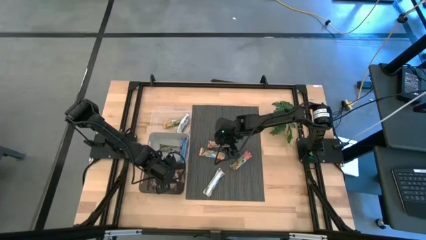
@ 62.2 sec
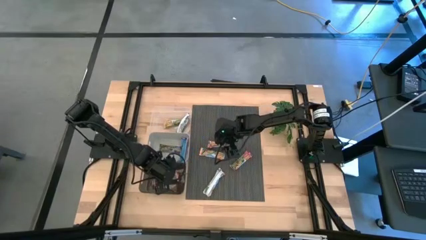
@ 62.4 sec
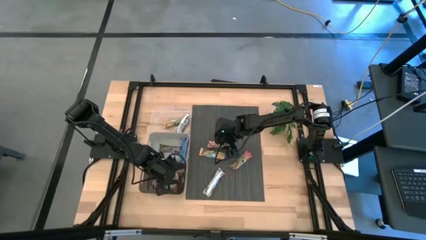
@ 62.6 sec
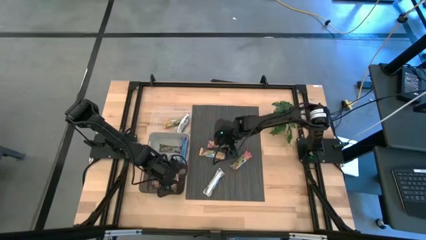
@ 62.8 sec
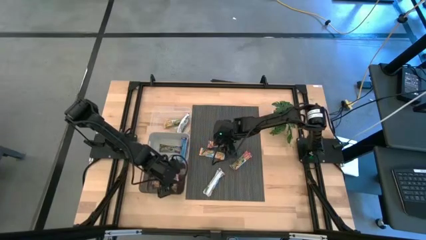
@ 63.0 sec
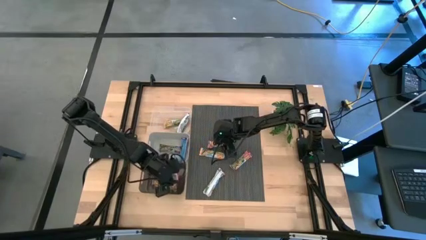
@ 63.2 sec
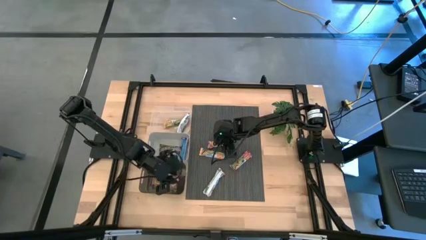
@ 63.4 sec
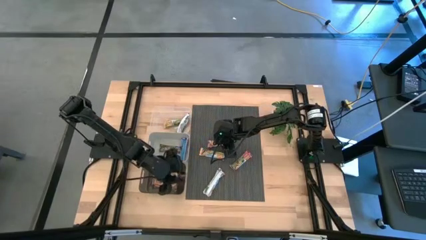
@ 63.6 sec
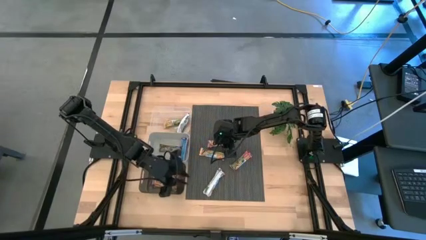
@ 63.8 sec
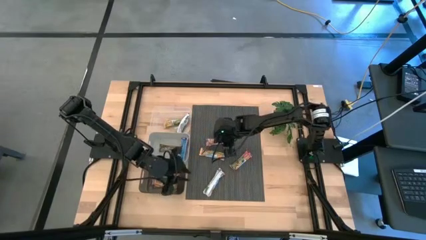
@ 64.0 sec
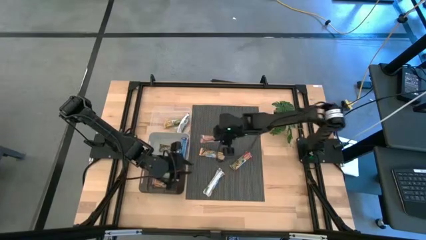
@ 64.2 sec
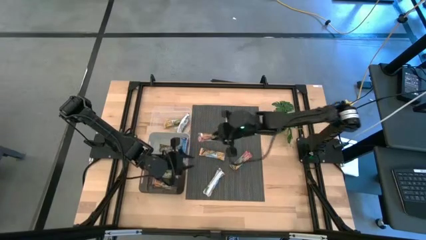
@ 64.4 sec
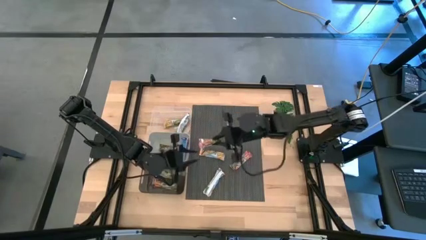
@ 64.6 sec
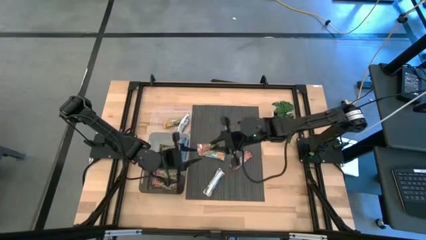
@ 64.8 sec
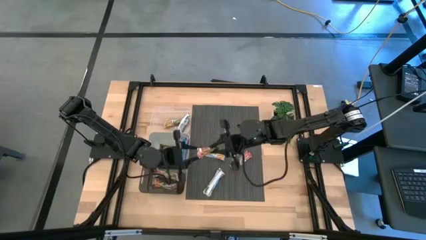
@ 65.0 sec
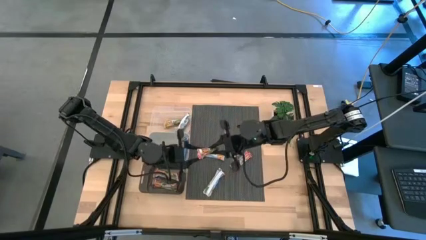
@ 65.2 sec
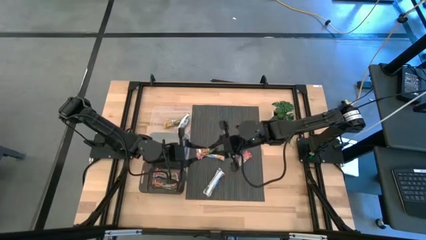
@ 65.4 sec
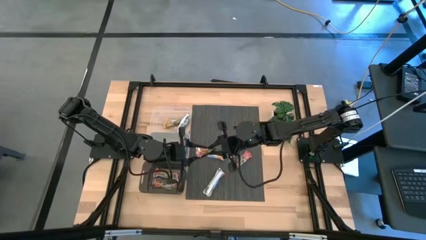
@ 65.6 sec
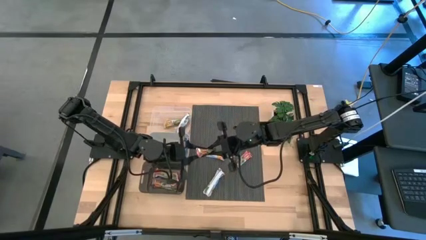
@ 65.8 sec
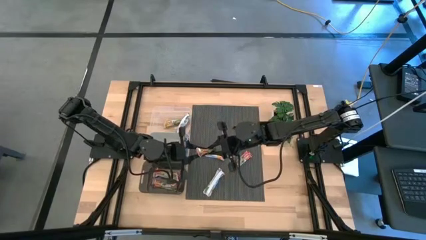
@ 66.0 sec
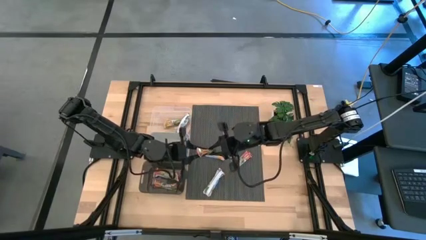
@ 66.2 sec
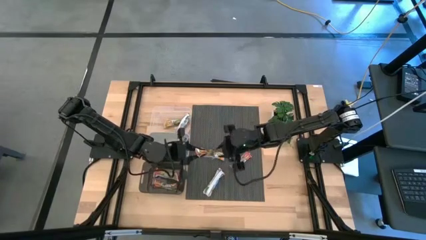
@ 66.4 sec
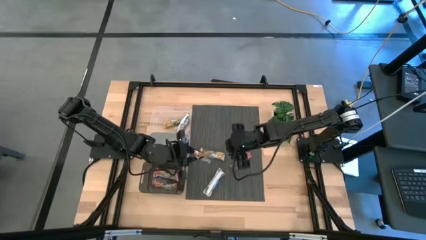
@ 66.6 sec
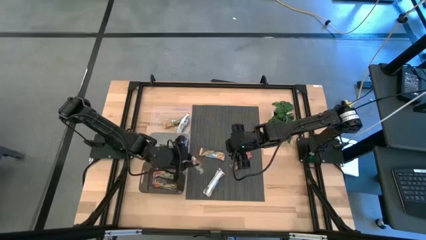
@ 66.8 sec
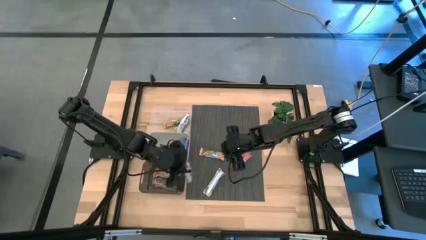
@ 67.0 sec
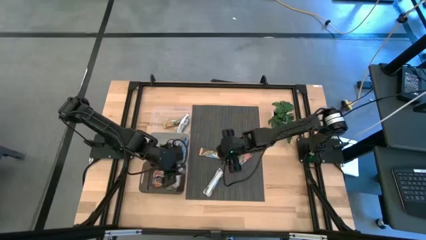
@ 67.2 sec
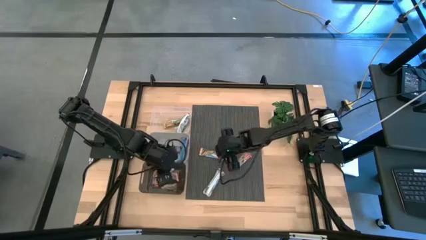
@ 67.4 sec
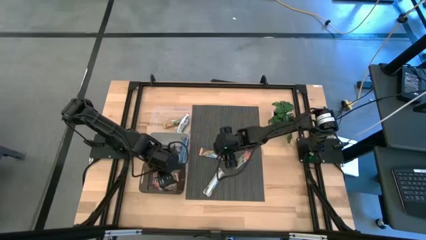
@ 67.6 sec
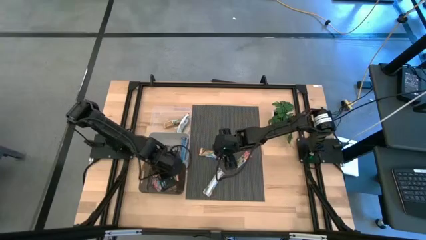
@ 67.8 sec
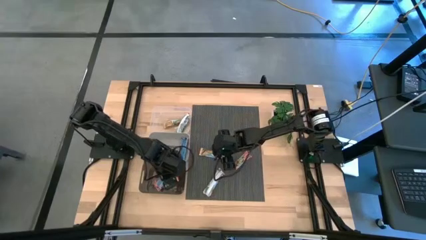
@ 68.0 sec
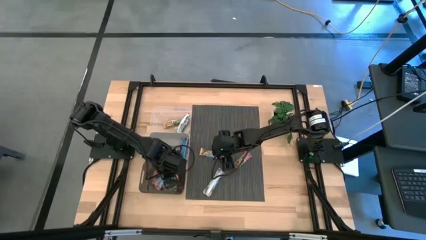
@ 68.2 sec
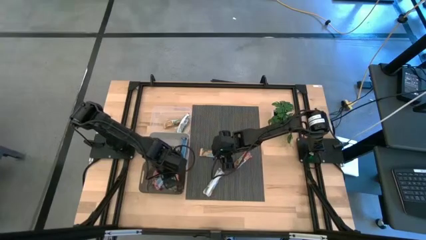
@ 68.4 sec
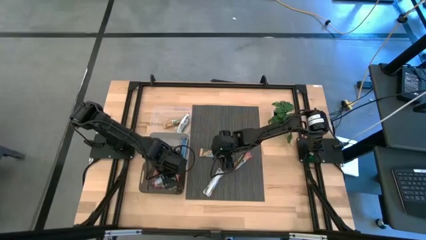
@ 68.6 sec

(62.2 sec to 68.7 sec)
Task: Pick and place Granola Bars by type
Put the red granola bar into the black bin

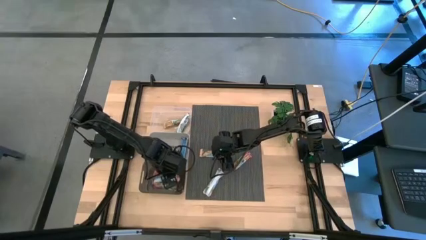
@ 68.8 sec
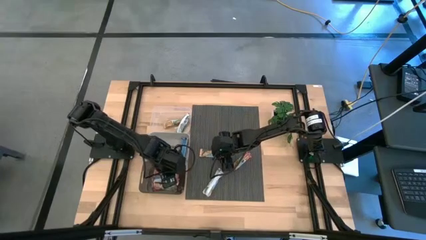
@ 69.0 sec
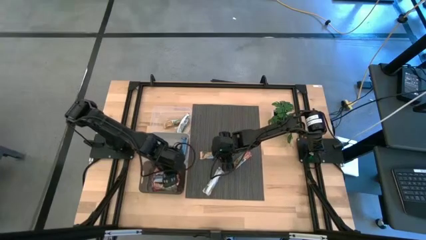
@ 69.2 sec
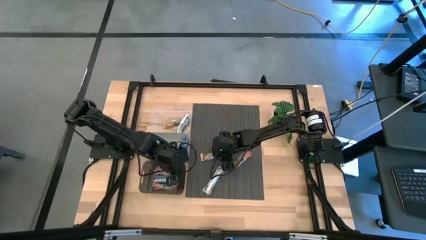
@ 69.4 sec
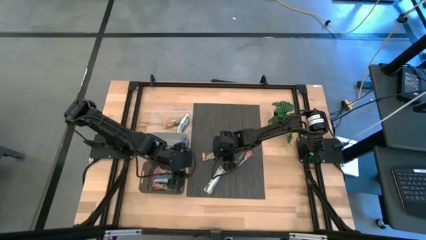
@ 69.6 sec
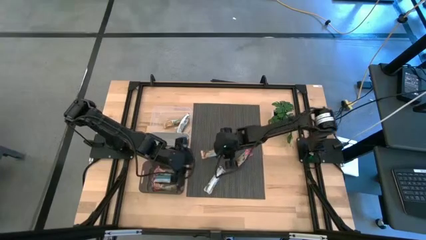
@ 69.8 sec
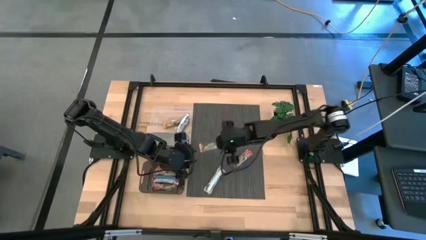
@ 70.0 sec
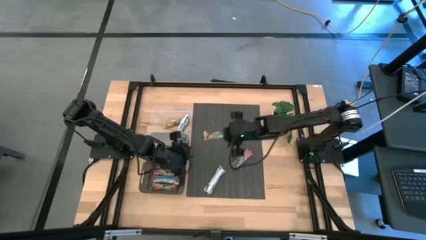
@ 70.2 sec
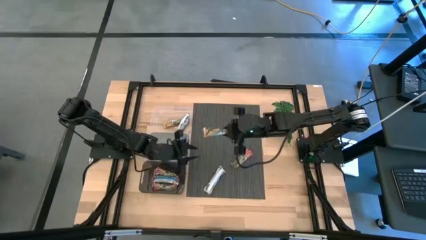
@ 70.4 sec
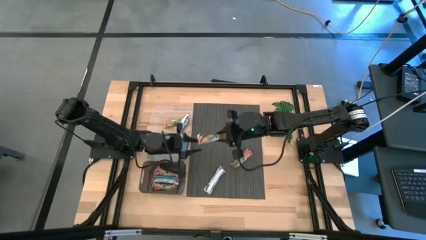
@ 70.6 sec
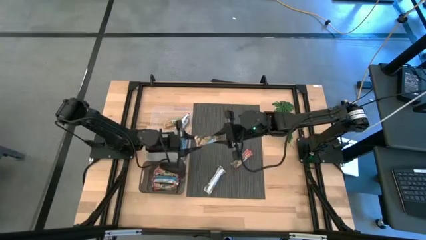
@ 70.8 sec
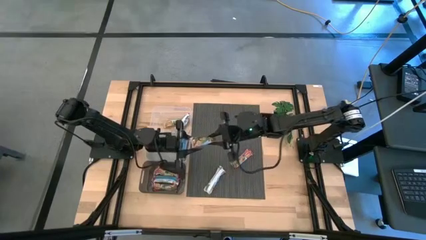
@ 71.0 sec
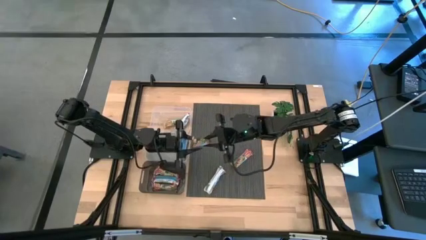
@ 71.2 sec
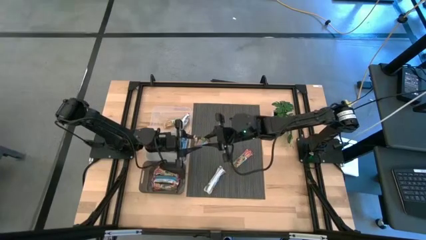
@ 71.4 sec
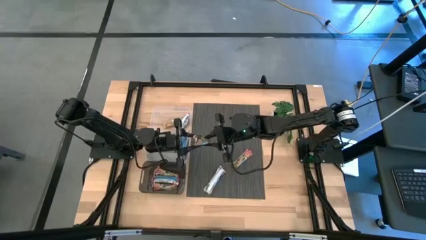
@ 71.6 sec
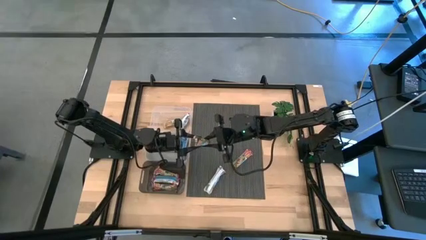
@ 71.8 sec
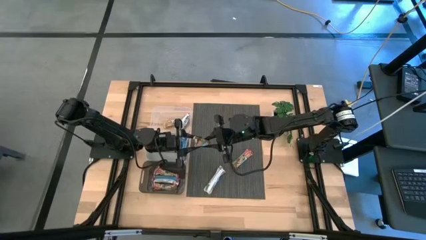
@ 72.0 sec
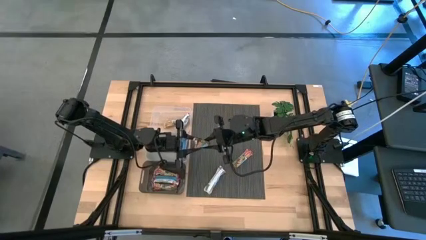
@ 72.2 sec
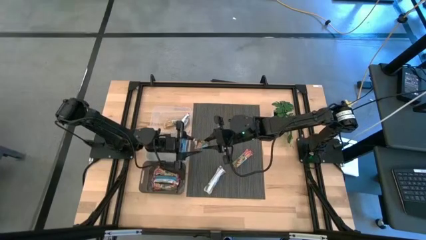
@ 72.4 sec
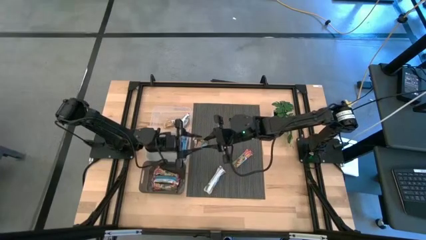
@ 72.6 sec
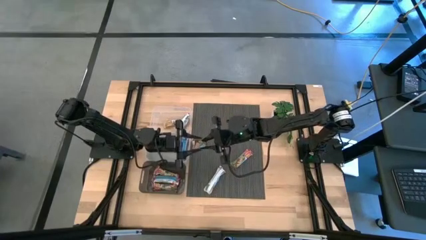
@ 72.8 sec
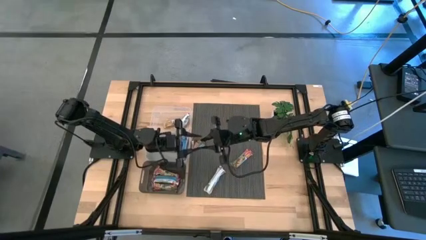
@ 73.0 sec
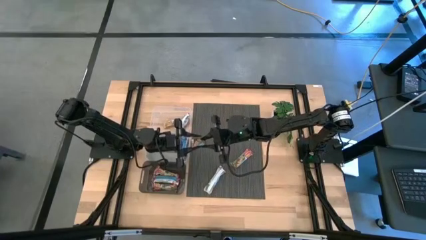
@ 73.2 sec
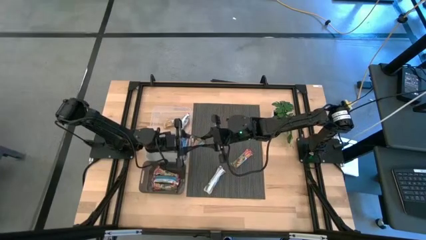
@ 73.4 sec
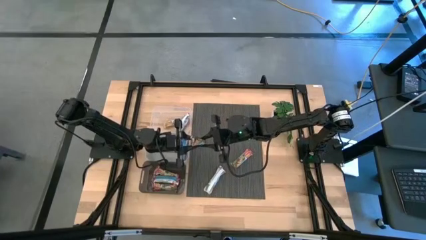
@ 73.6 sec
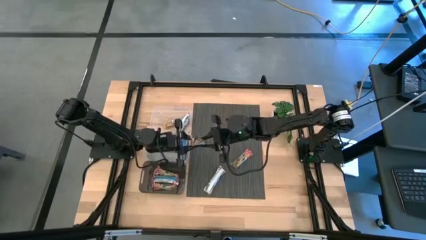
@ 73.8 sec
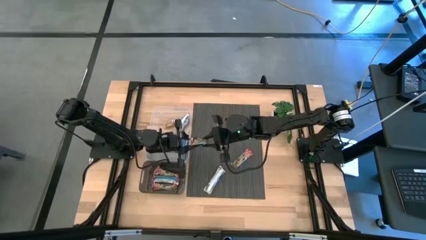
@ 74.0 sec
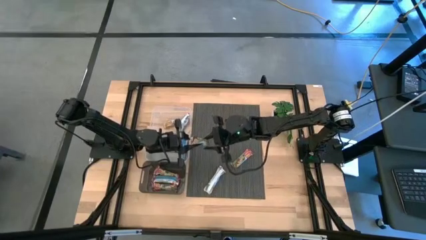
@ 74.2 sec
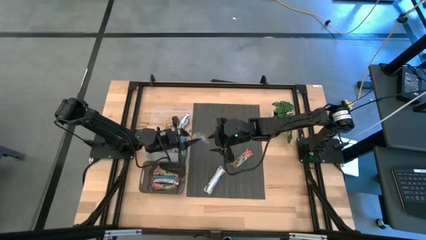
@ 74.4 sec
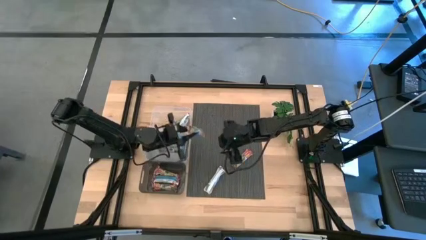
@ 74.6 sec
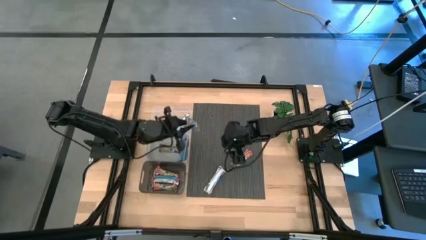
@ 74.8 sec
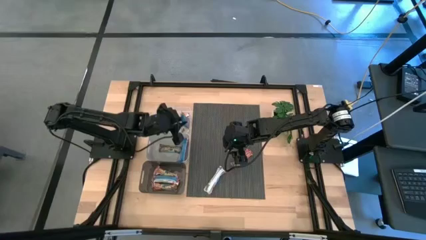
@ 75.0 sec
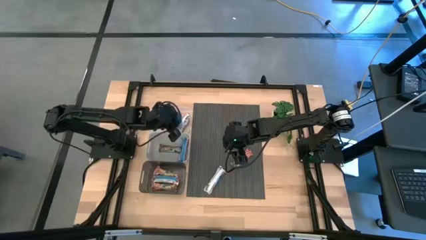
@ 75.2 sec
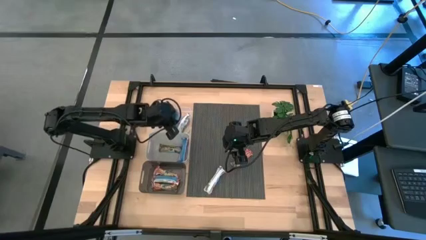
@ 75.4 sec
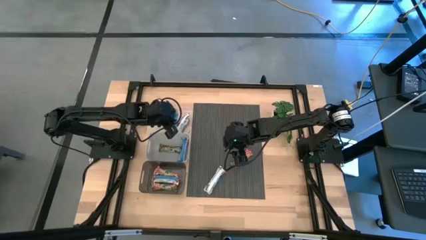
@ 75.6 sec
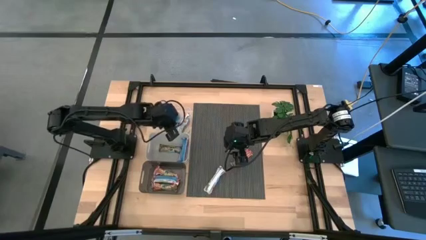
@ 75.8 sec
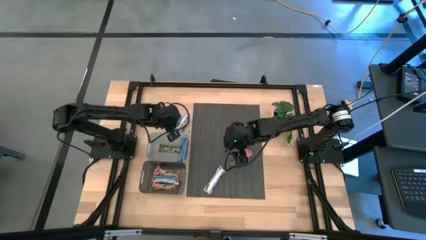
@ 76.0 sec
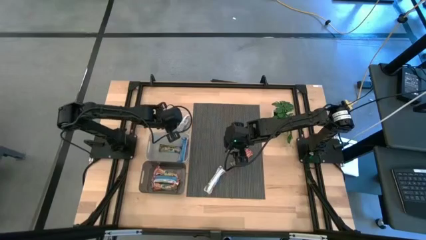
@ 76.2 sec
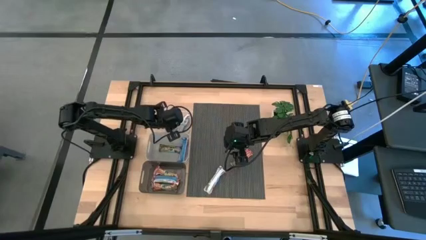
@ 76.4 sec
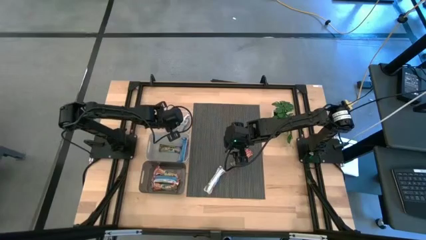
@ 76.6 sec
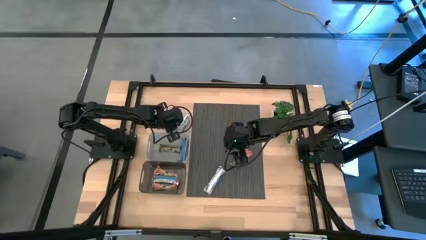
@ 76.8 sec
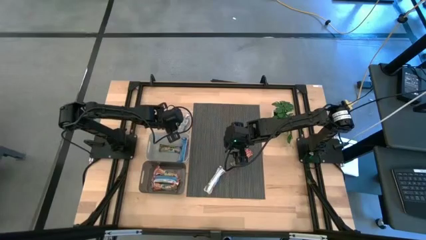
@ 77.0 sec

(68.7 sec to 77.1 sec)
Put the yellow granola bar into the transparent bin
